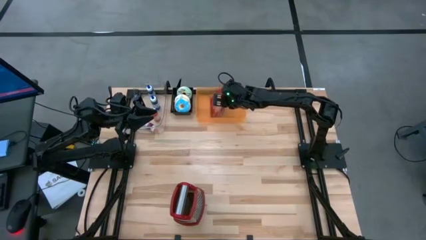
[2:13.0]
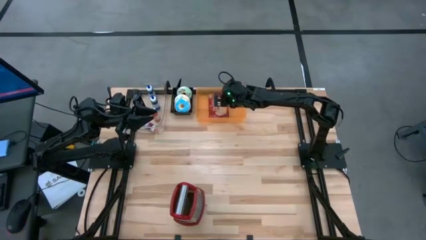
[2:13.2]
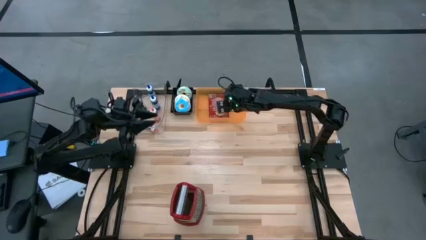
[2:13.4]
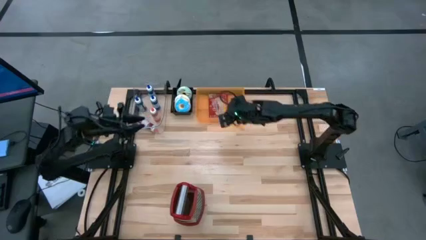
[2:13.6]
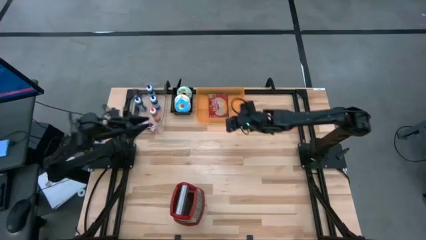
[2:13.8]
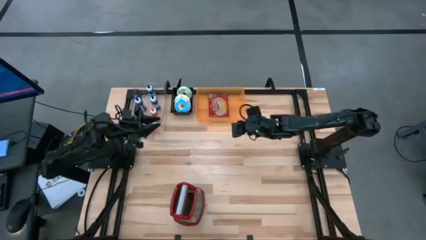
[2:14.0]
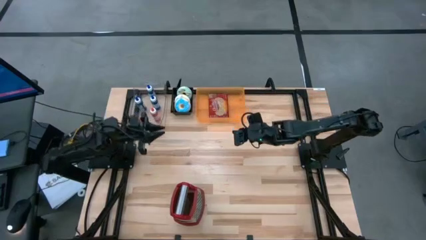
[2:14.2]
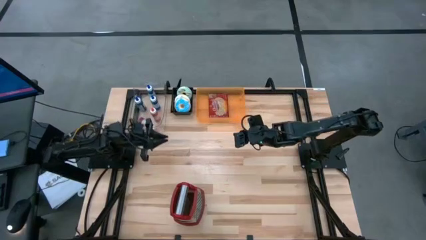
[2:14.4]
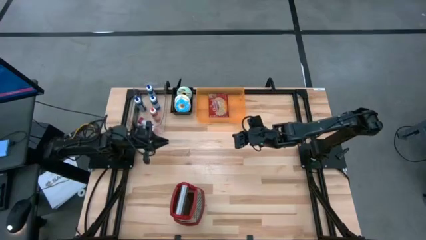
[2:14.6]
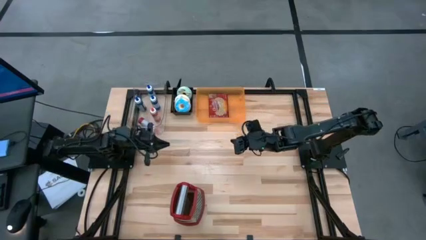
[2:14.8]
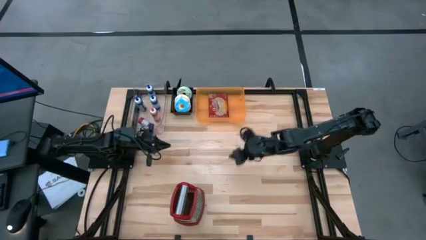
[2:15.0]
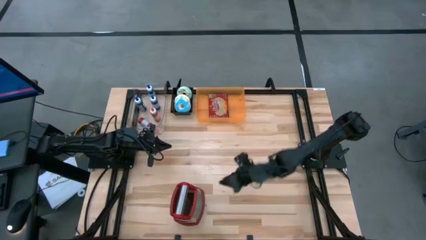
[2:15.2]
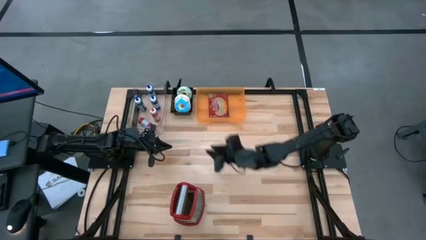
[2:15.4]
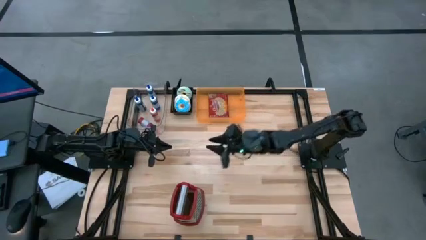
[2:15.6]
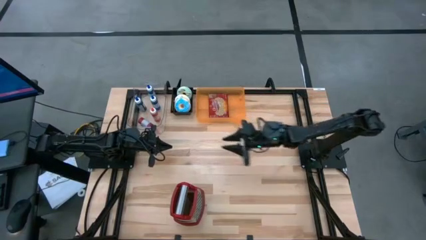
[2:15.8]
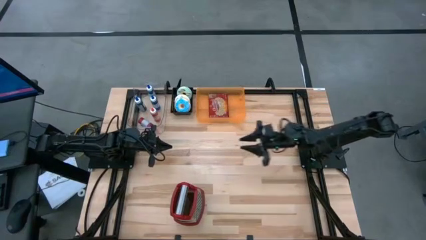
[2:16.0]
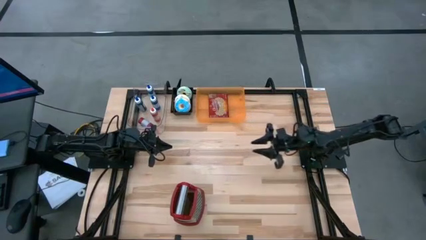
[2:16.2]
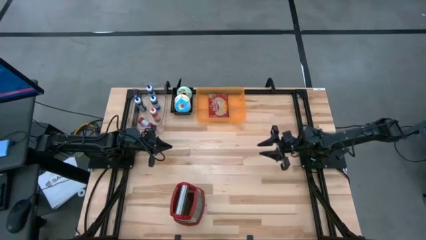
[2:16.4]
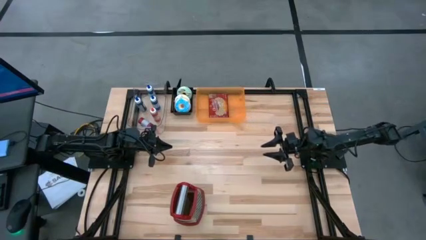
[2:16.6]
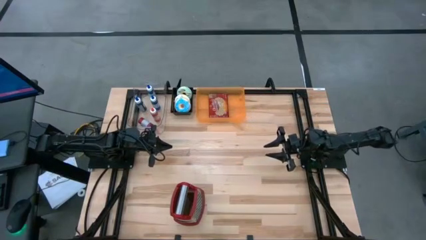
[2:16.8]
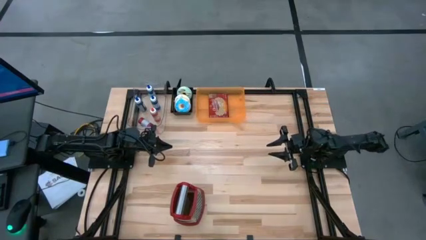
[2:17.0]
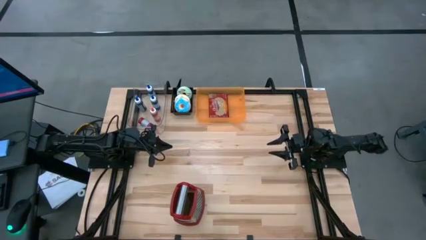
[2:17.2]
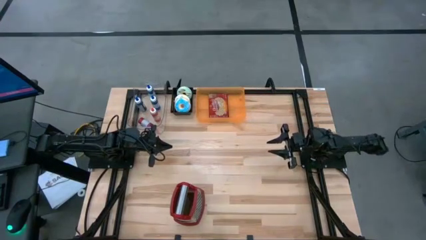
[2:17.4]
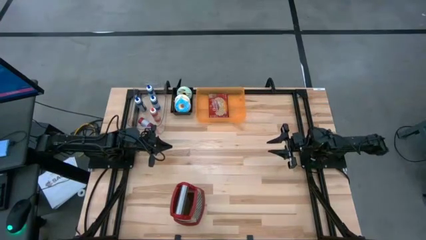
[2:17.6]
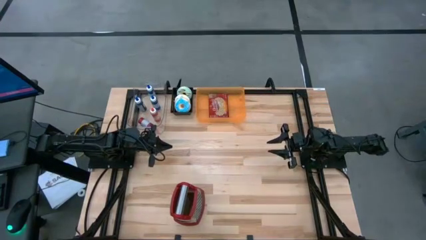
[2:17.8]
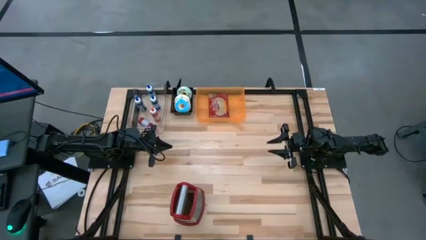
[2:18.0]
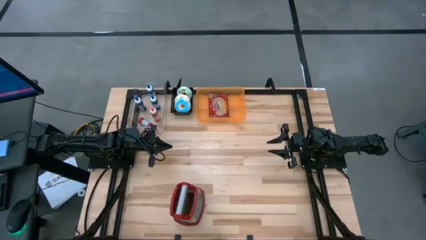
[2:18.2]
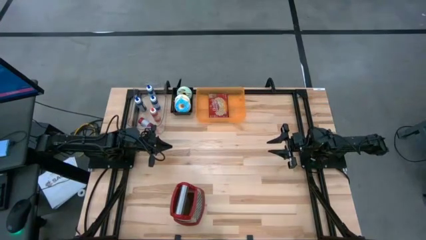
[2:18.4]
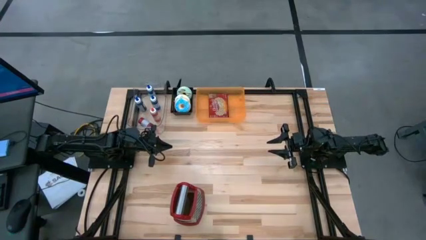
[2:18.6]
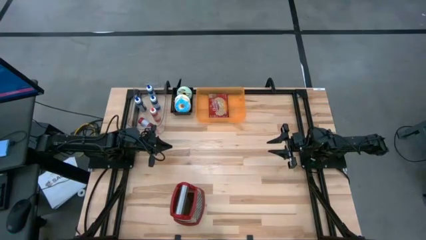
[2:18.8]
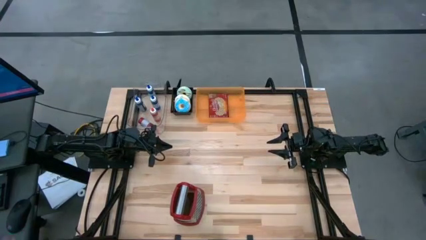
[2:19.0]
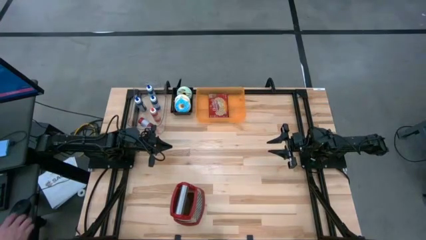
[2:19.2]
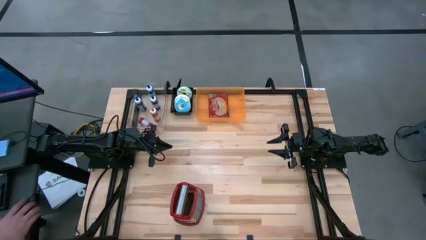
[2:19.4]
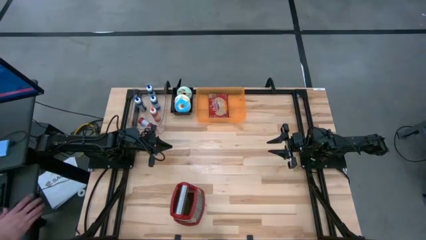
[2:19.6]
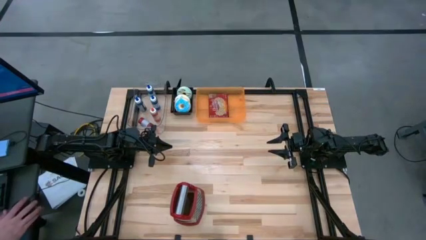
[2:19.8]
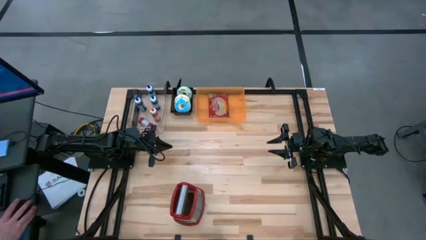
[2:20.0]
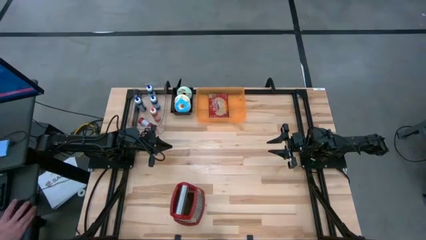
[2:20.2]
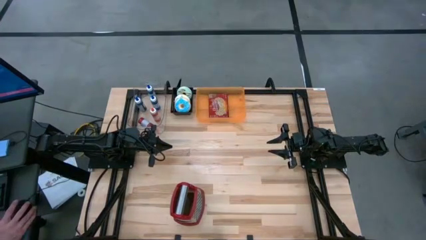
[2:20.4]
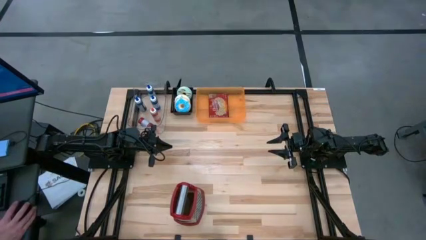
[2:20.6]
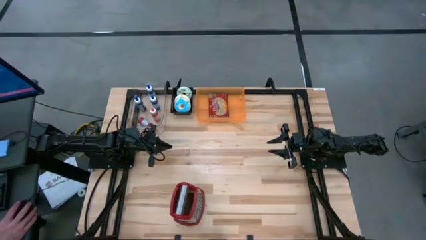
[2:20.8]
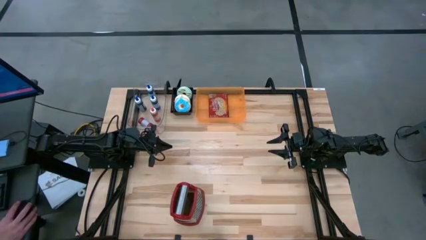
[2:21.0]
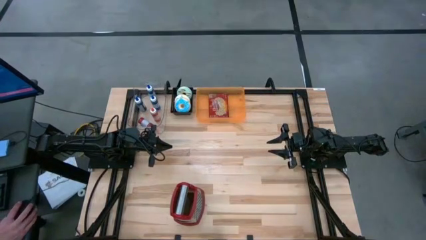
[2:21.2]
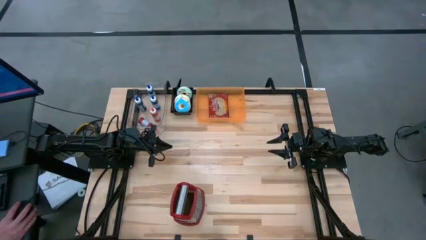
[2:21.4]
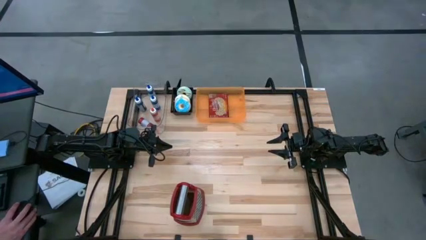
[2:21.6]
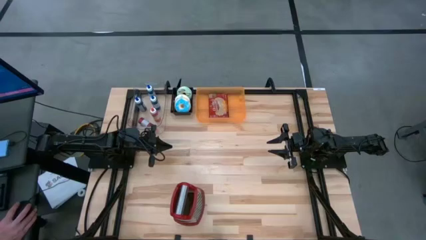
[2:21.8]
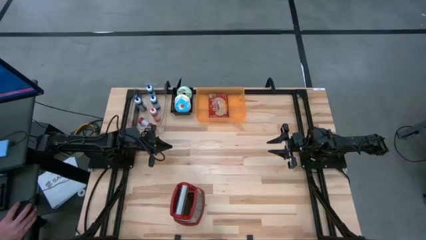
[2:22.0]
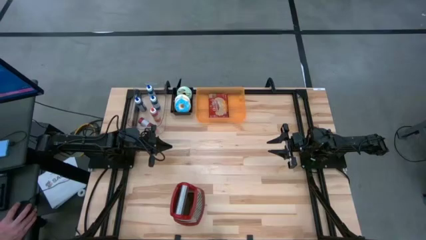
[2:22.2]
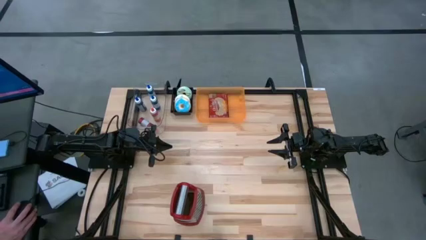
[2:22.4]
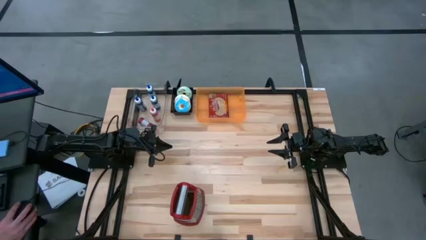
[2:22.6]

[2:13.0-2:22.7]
Return to Home Position

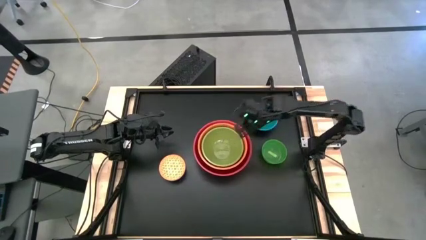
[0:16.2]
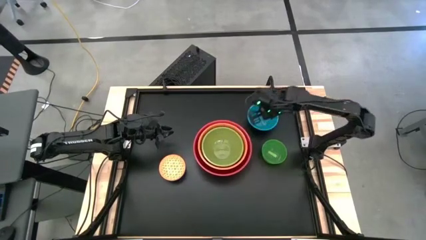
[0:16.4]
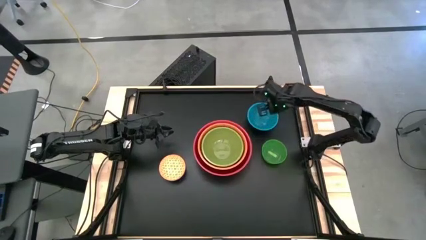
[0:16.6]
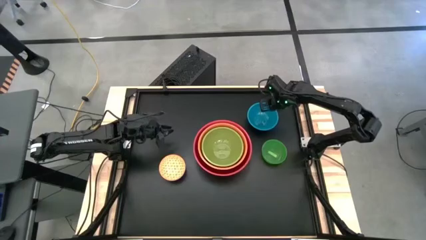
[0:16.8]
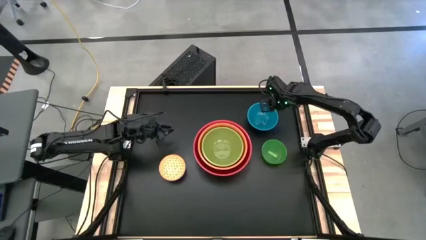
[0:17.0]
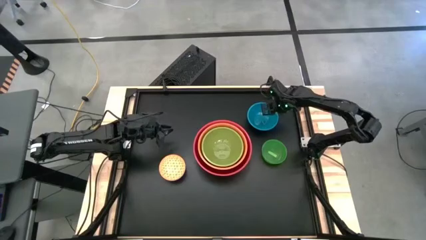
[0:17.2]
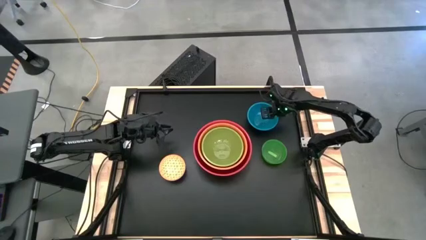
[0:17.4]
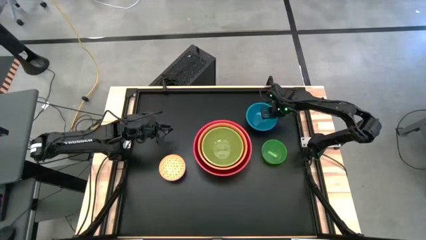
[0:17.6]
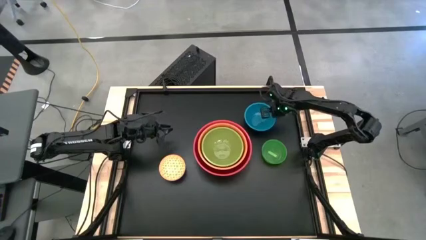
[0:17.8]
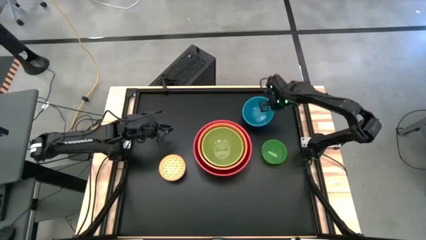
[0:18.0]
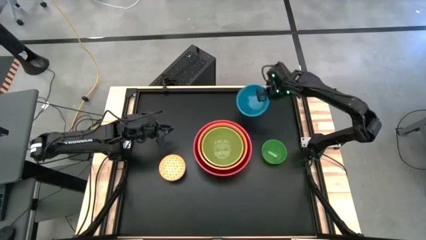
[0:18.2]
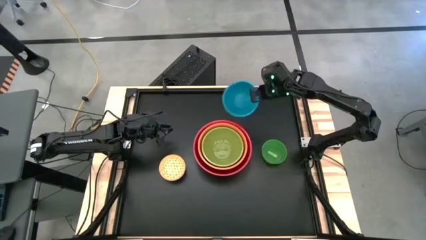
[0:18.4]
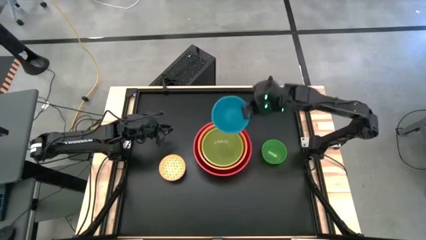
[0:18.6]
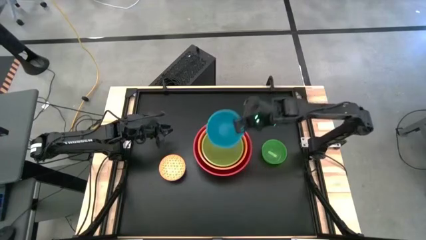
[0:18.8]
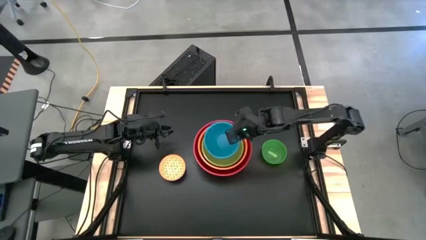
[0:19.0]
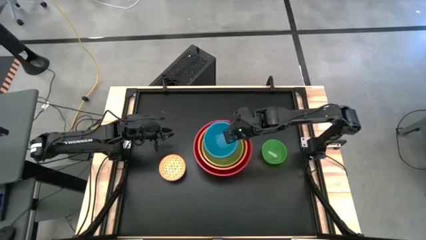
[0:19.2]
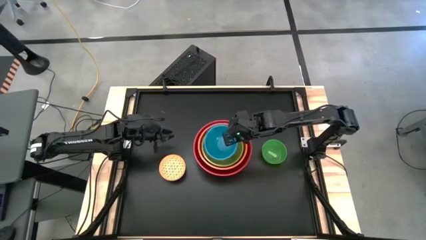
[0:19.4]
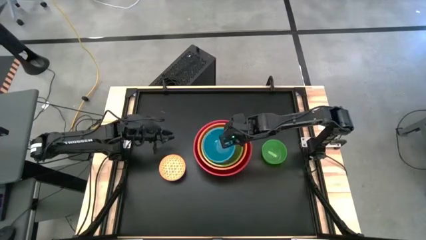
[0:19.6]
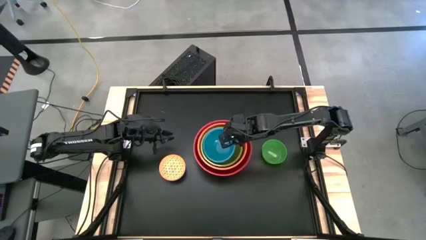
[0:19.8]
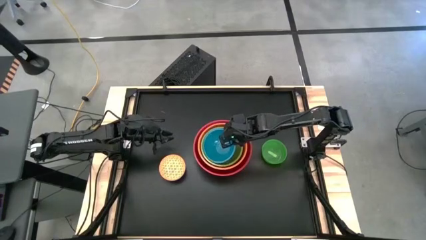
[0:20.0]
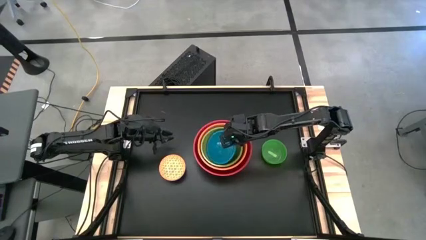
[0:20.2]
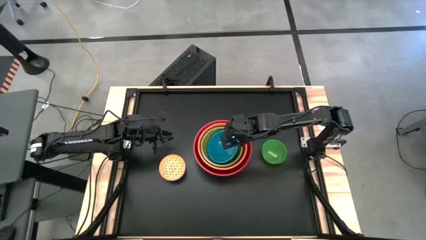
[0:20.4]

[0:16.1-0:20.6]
Stack the blue bowl on top of the light green bowl

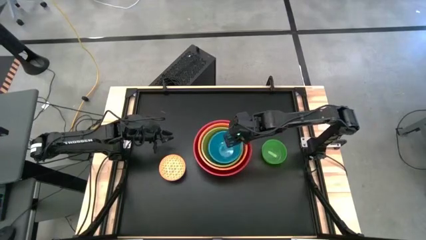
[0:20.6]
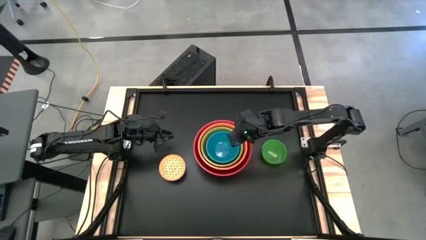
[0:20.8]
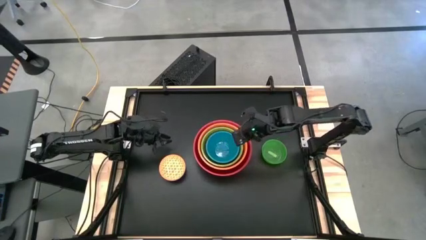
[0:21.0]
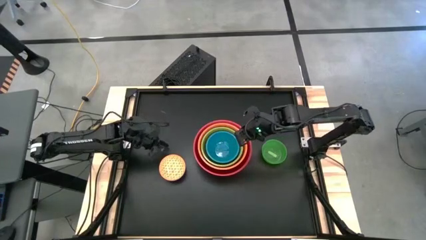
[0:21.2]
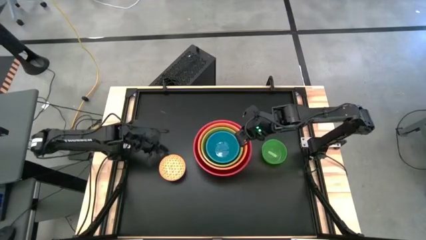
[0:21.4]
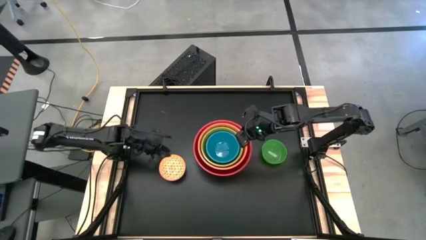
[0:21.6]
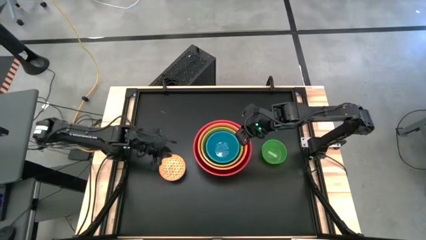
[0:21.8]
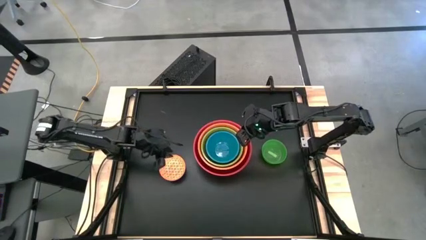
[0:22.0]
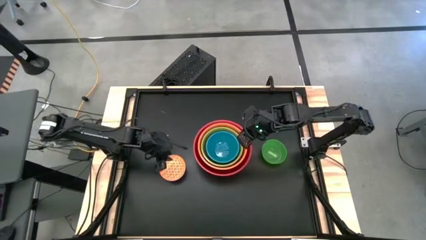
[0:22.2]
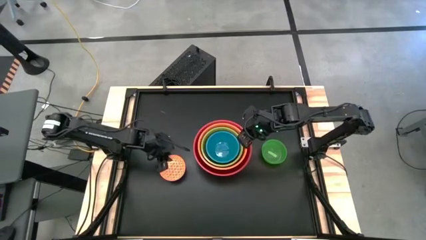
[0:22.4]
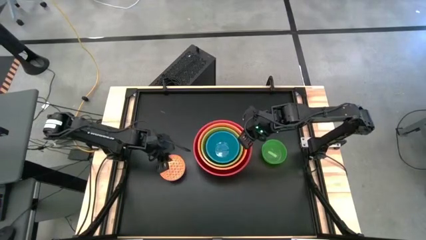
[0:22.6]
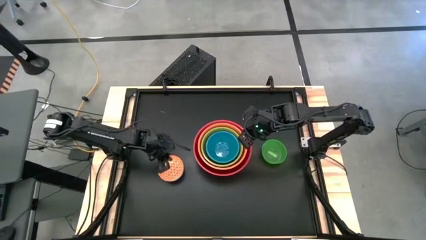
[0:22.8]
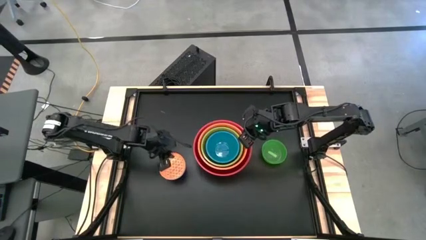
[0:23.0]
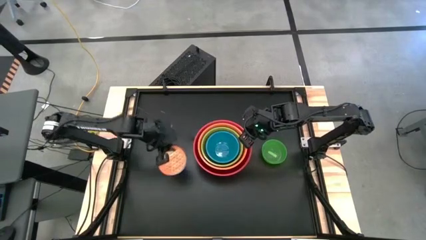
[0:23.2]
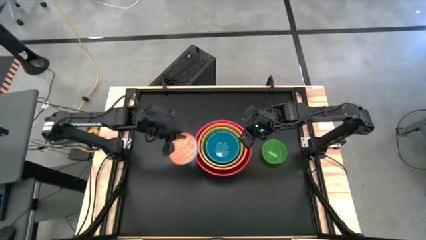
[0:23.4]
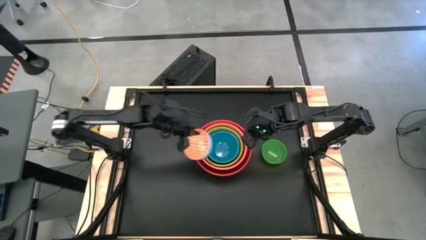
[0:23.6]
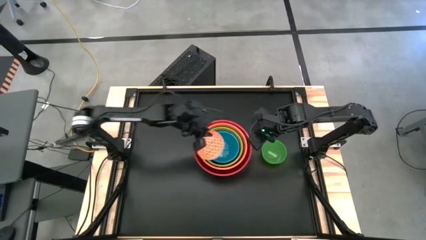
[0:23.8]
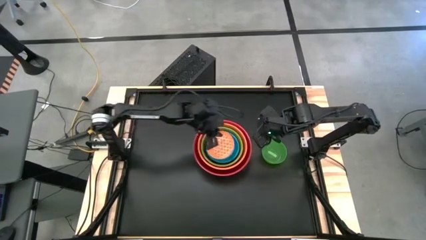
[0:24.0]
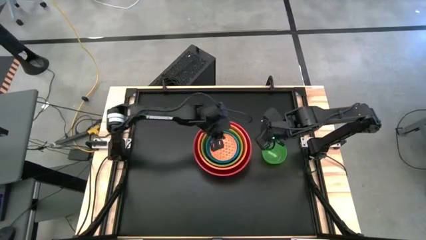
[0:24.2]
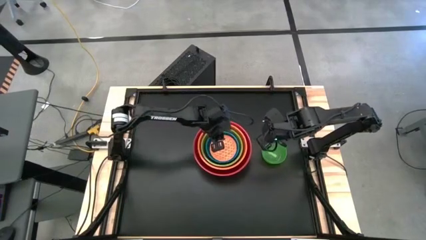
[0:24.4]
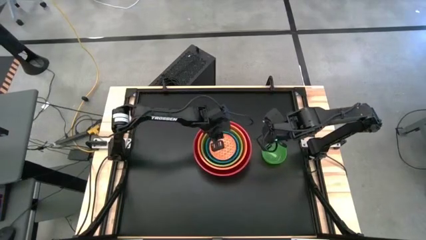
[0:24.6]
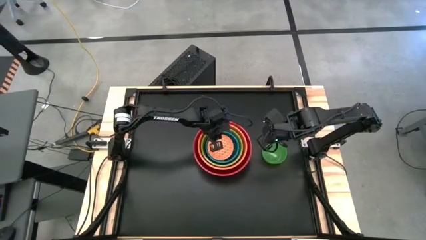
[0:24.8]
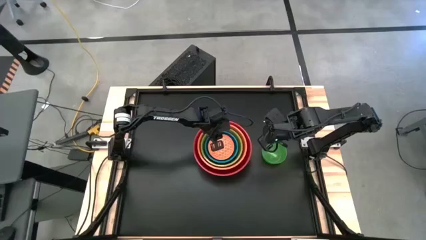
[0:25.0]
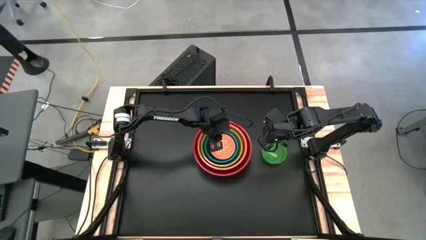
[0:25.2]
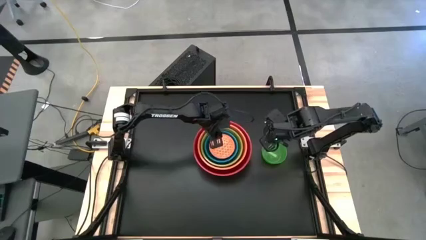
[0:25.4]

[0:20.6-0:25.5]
Stack the orange patterned bowl on top of the blue bowl
